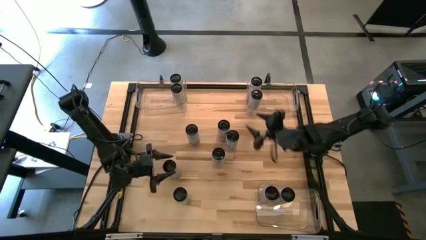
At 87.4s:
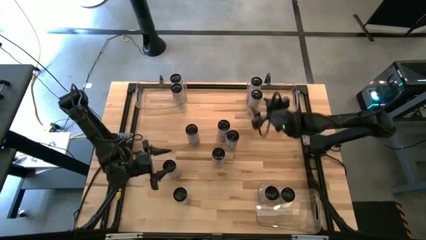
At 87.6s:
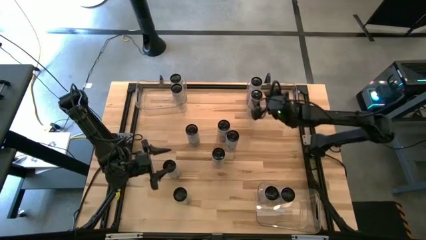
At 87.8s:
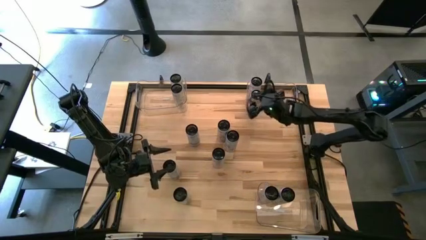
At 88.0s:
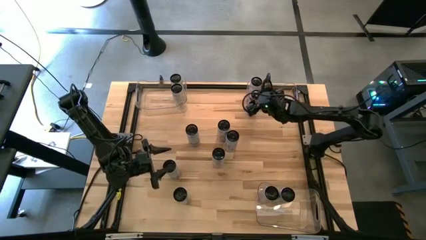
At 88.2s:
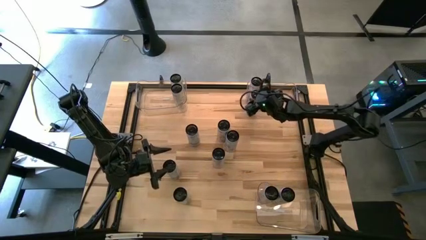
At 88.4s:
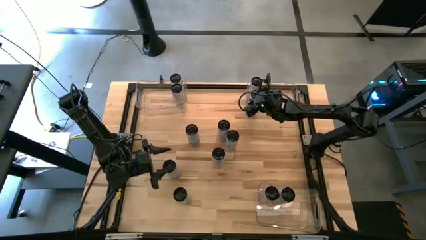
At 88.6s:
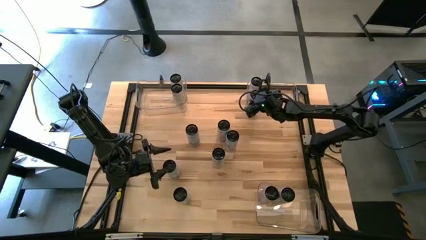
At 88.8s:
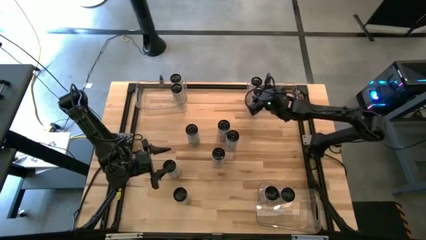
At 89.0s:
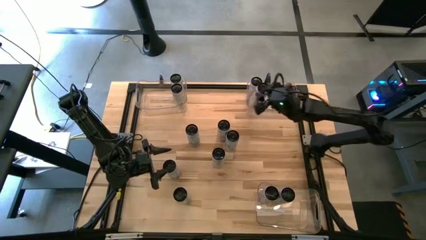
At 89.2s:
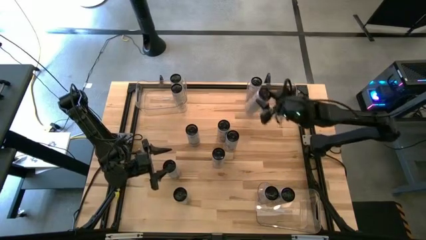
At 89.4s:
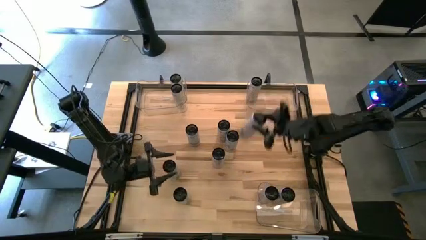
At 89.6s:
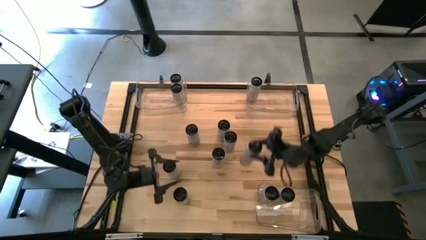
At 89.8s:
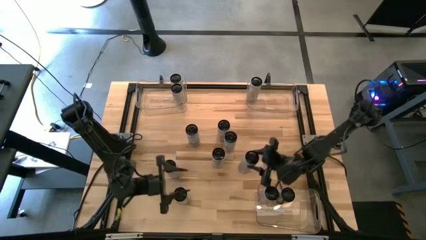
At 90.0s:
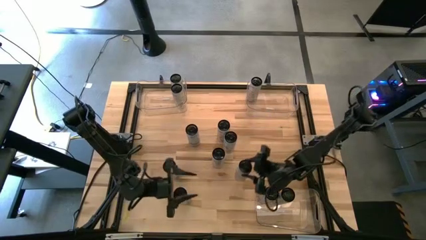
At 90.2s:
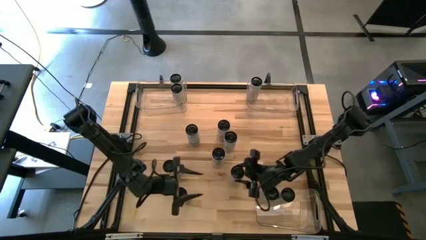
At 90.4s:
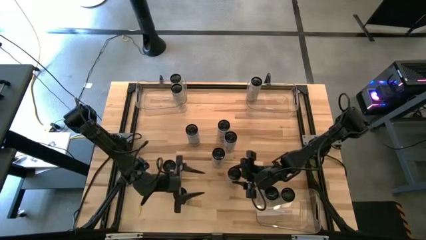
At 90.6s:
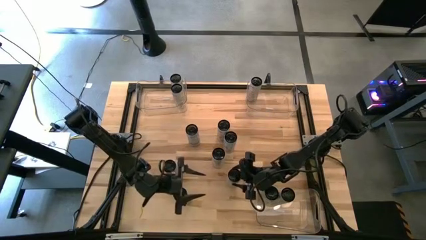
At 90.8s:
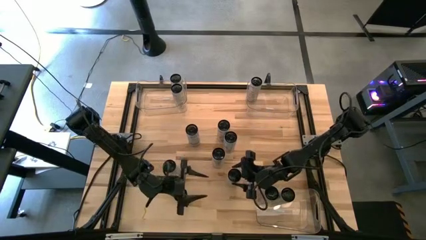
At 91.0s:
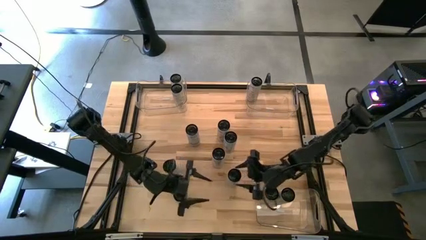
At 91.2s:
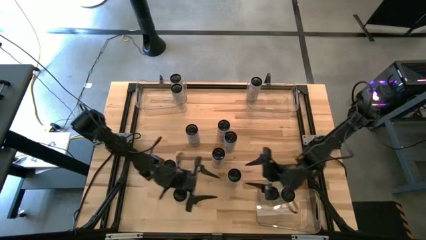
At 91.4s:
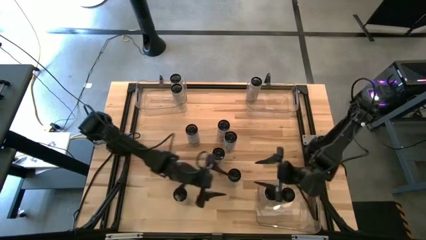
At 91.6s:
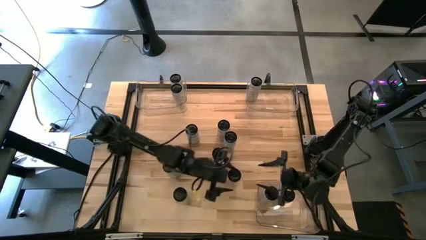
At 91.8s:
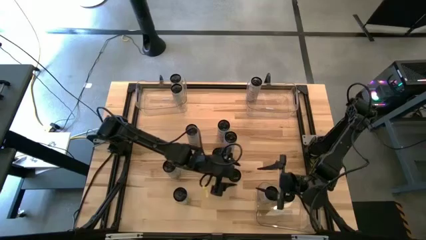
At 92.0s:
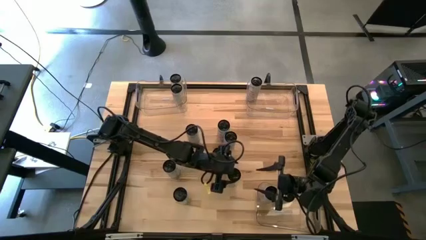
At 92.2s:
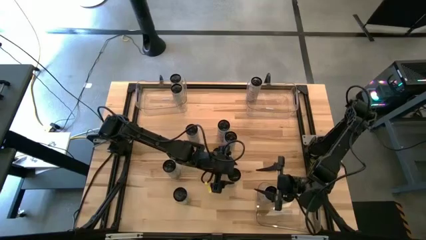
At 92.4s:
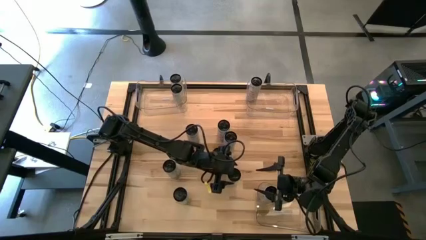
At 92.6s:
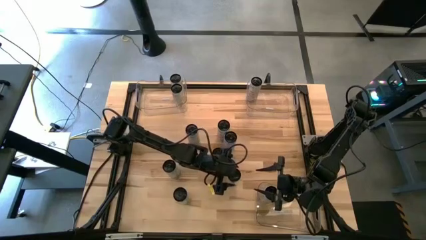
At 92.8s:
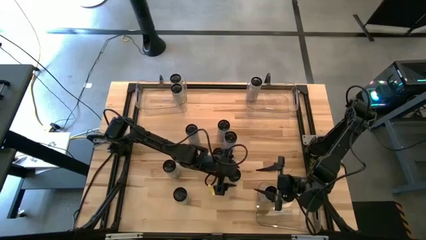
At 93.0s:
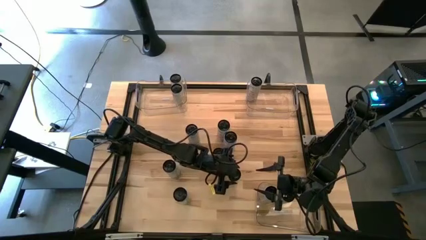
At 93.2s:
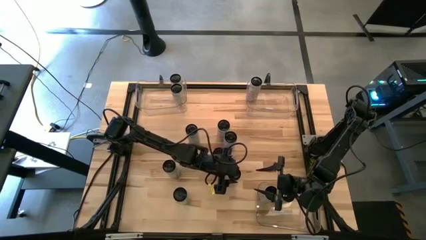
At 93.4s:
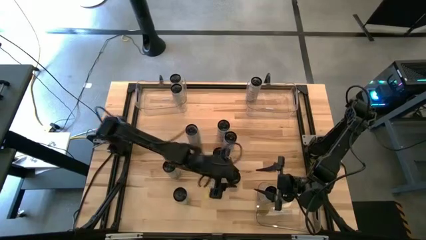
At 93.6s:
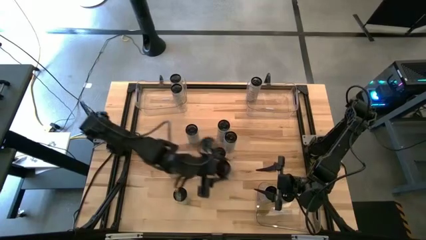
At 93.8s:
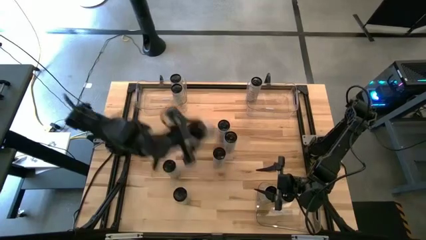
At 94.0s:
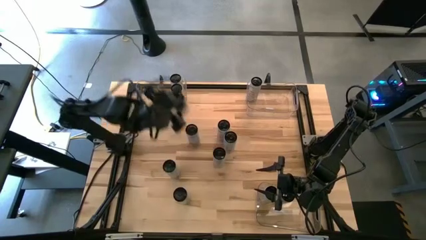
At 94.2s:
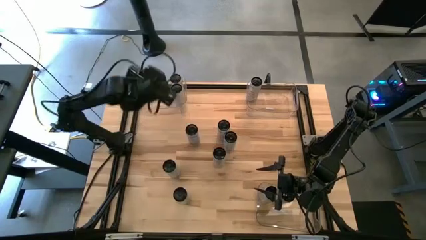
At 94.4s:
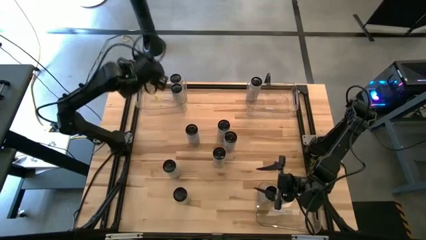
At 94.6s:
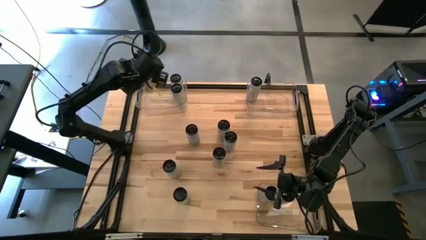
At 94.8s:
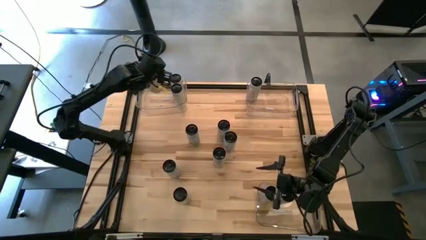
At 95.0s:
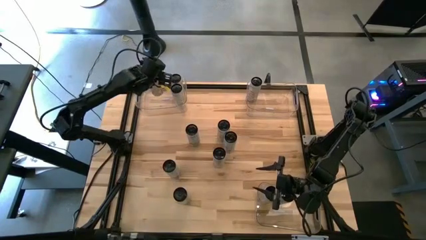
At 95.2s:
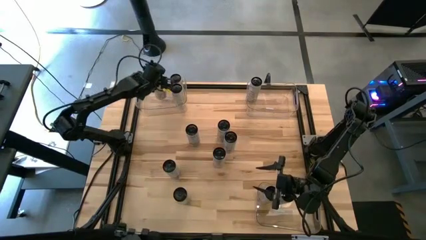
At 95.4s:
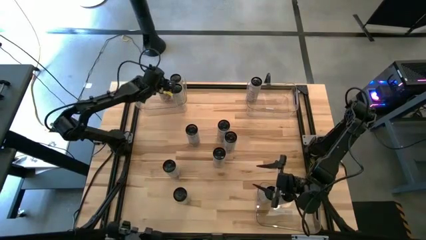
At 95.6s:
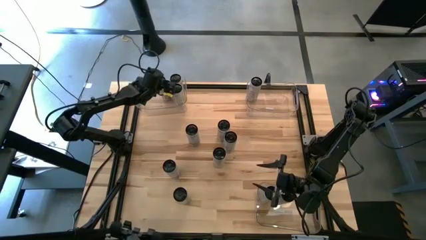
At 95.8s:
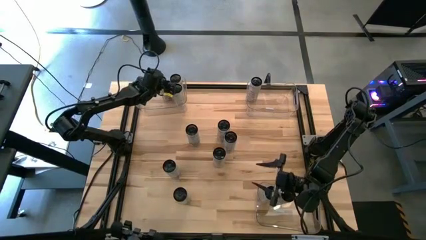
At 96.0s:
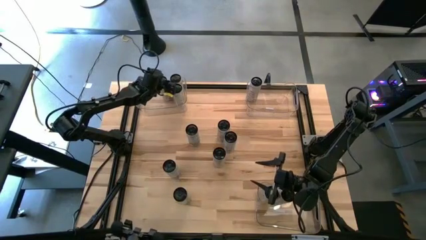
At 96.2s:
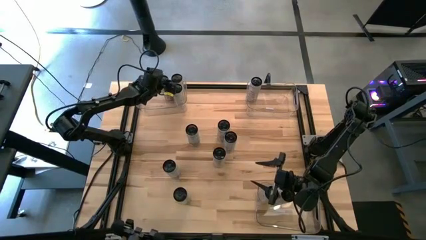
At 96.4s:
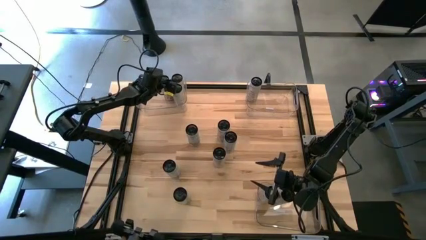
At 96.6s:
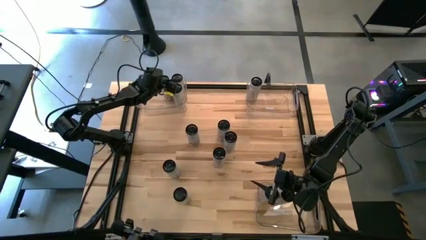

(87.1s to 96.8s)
Task: Sort soda cans
Put the white-yellow soda can into the top left transparent bin

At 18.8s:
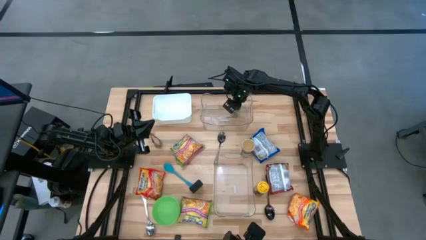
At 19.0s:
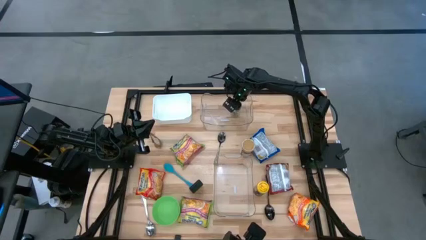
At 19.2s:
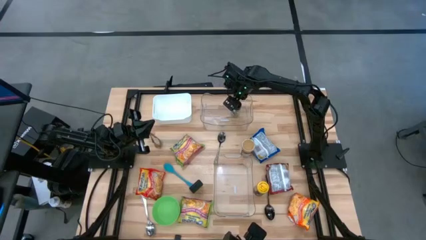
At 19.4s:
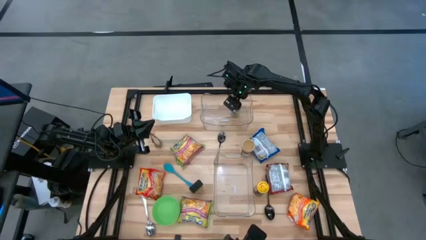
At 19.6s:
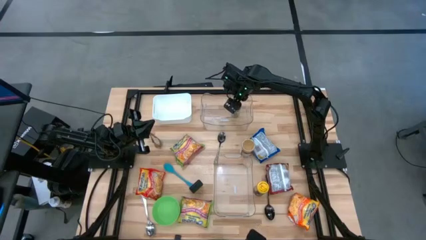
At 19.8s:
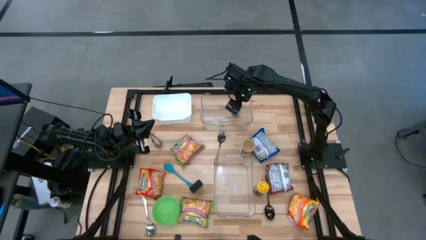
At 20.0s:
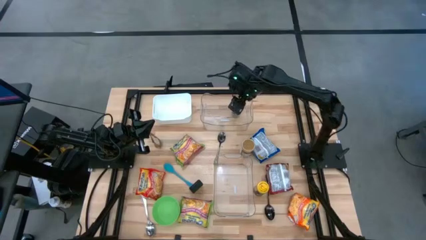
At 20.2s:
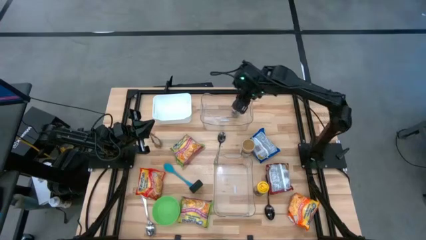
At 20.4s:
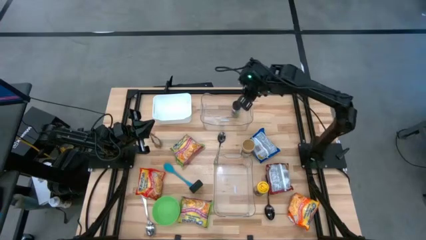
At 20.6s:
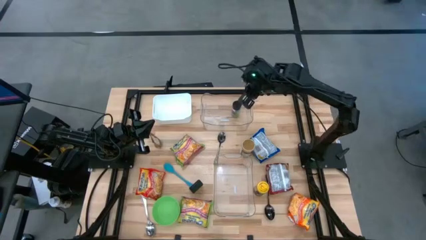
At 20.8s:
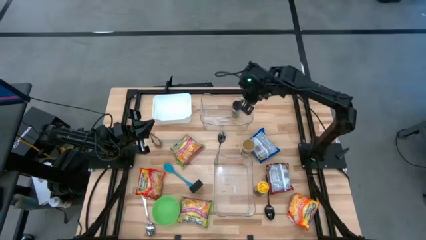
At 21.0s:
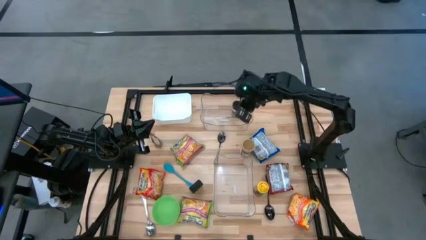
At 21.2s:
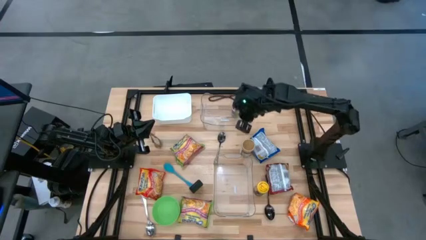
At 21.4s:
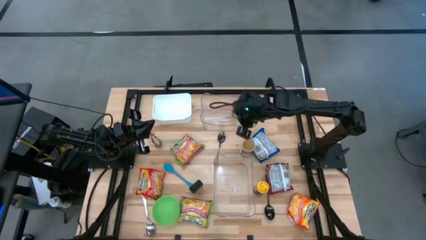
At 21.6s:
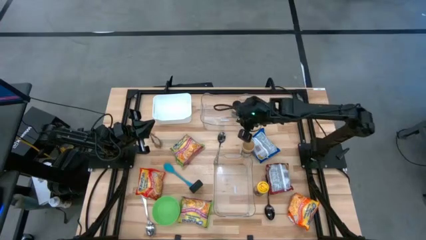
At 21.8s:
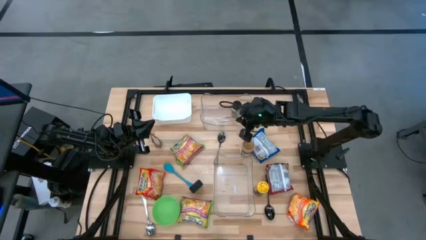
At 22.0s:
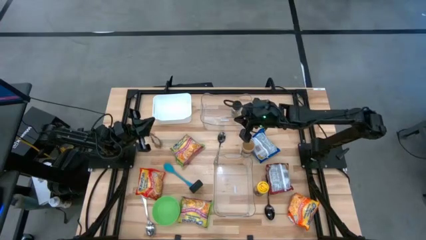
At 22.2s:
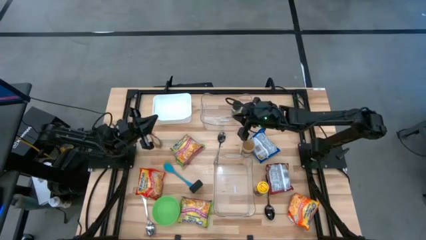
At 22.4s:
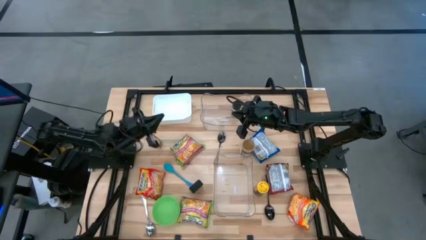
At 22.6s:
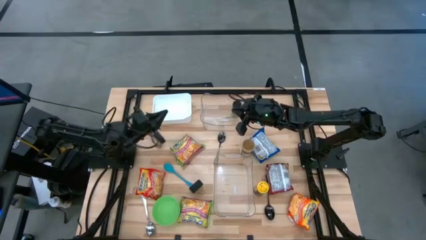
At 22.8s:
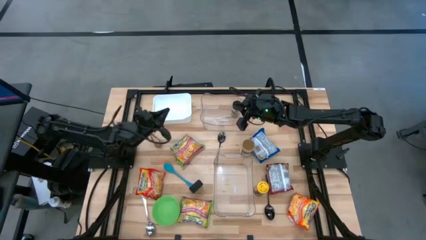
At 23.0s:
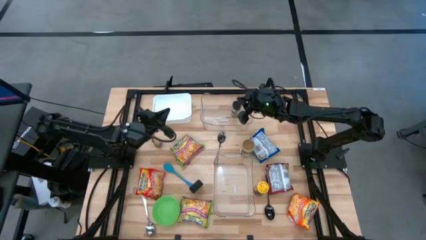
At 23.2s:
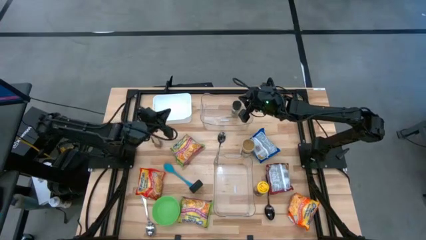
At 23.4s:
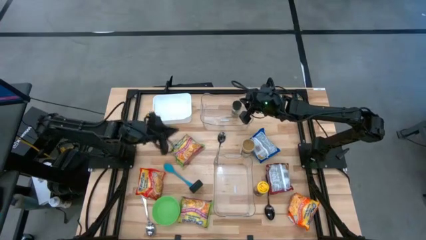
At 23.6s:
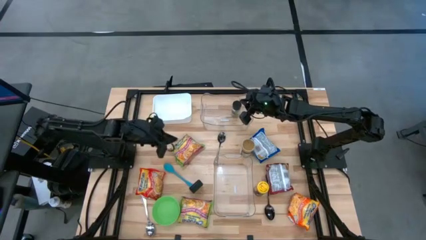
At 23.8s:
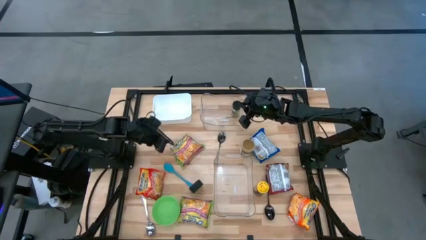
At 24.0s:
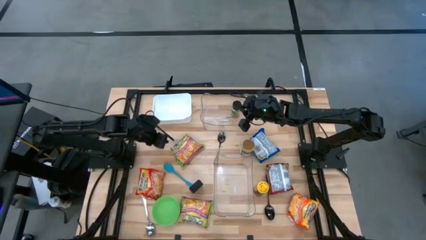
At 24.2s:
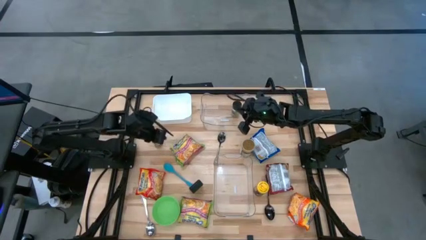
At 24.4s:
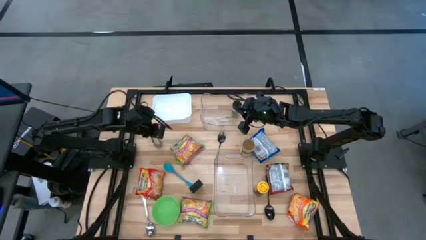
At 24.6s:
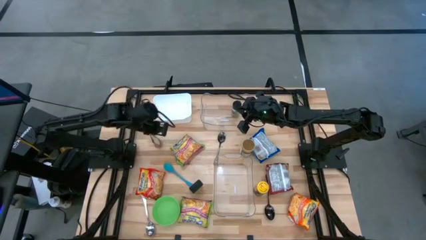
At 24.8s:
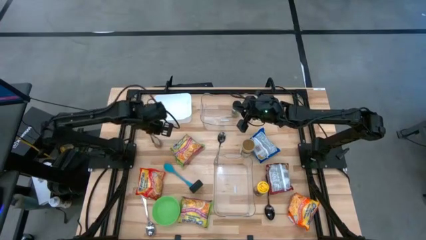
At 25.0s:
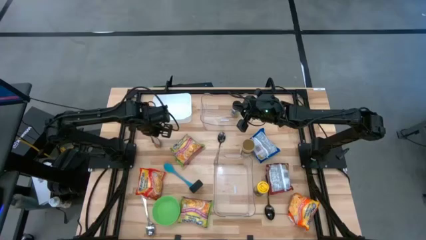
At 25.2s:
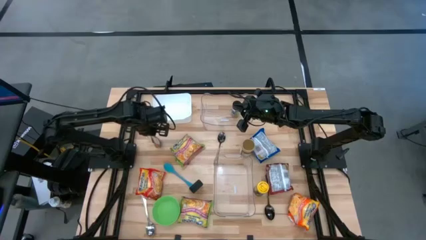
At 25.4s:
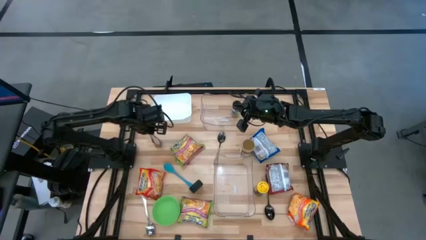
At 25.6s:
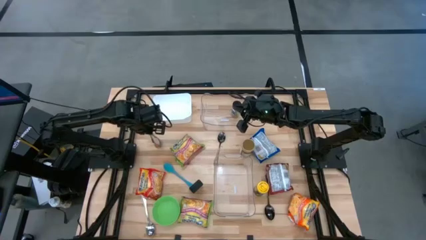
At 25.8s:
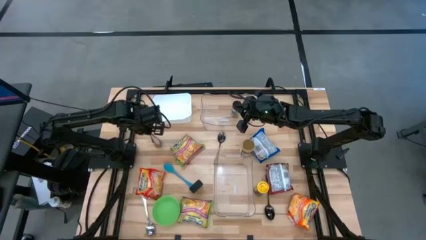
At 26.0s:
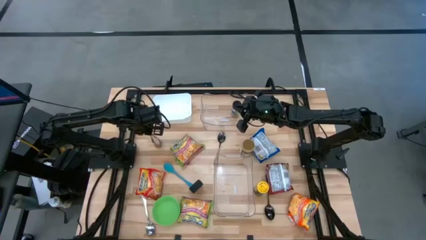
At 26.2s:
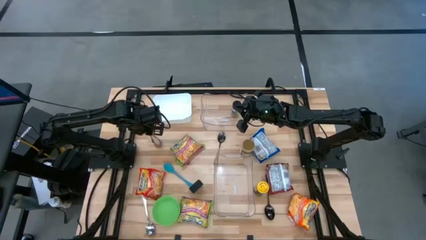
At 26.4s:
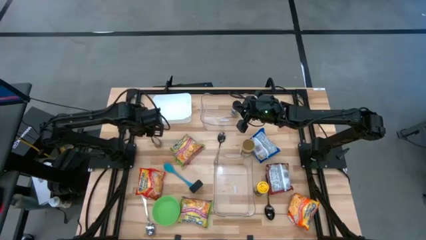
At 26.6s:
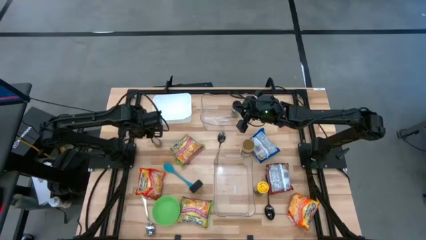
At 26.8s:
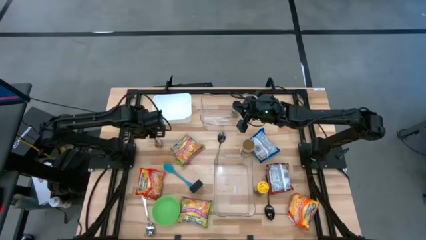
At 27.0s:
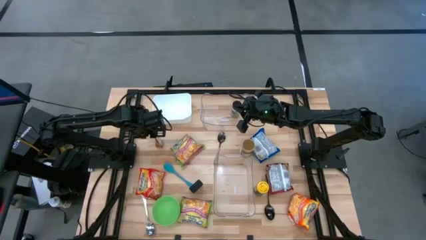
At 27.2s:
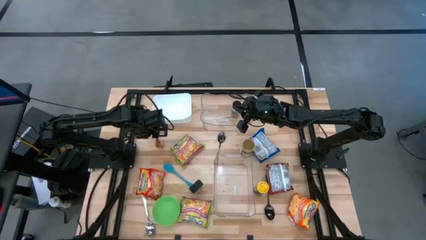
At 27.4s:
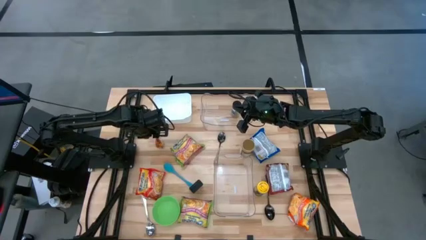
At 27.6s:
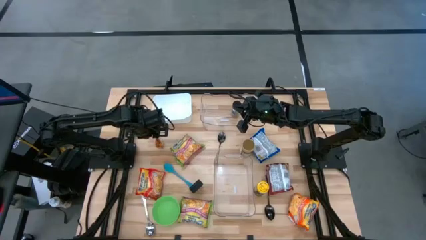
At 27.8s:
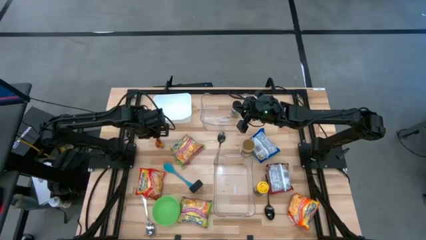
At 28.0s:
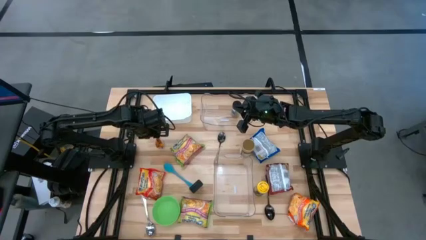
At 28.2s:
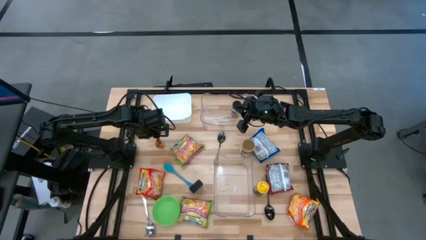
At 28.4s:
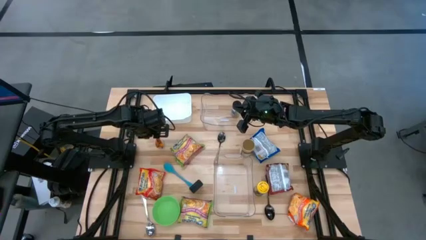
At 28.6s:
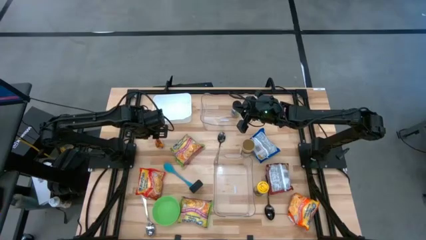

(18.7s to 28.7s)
Task: Pick & Place Food Item
Put the orange seasoning pack into the top transparent bin
